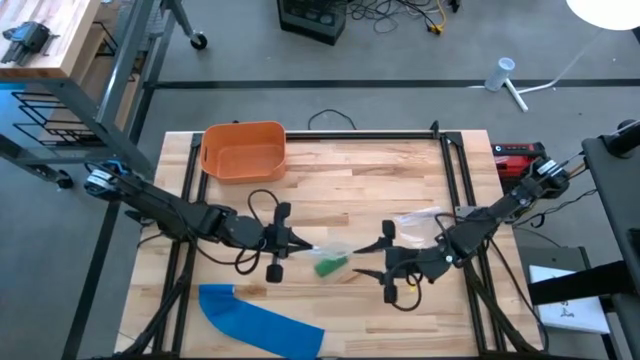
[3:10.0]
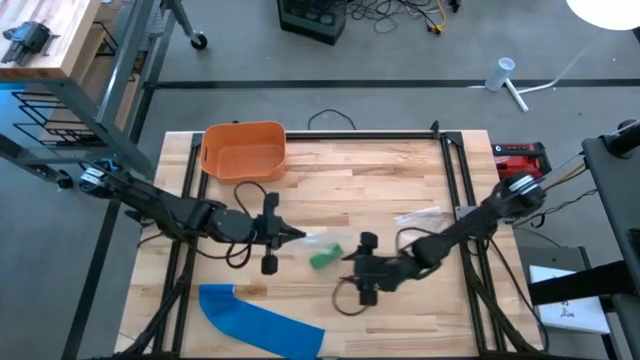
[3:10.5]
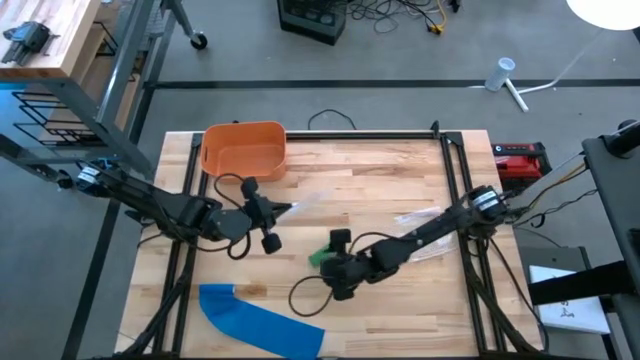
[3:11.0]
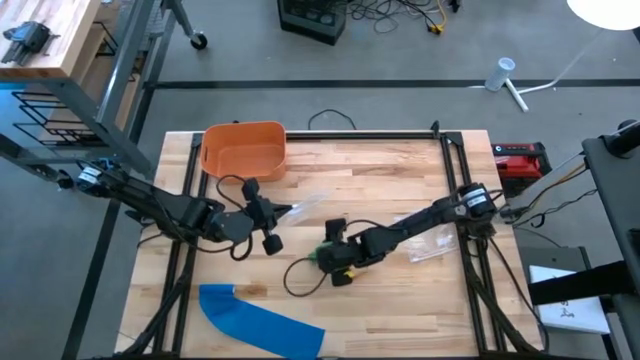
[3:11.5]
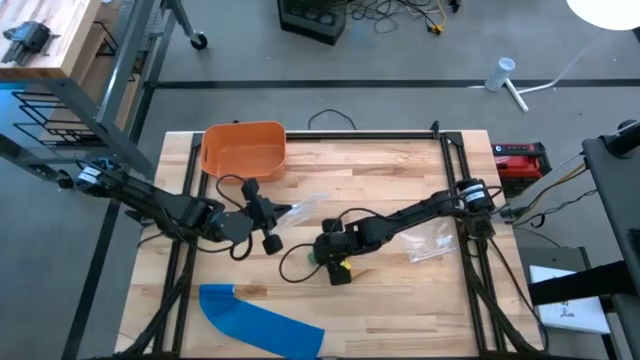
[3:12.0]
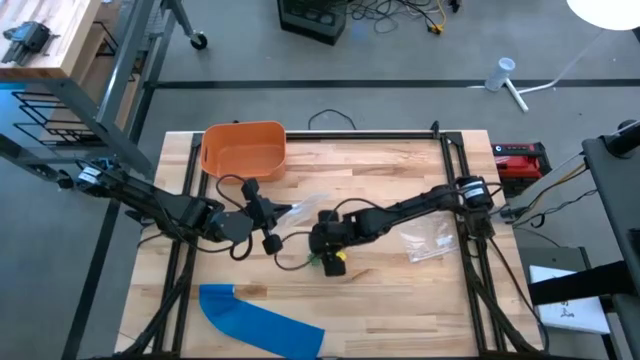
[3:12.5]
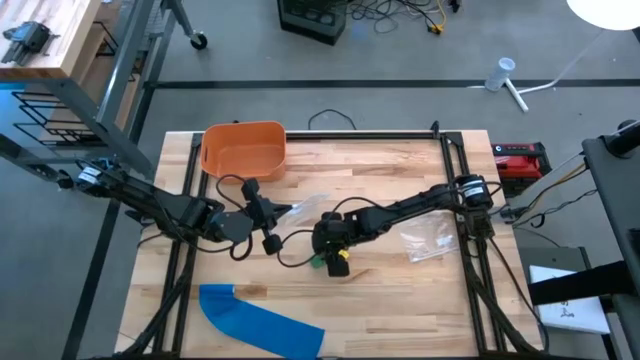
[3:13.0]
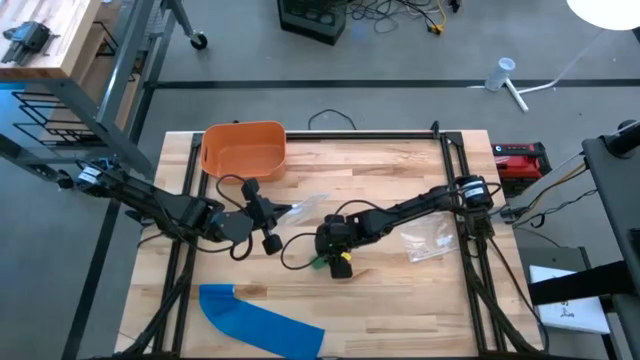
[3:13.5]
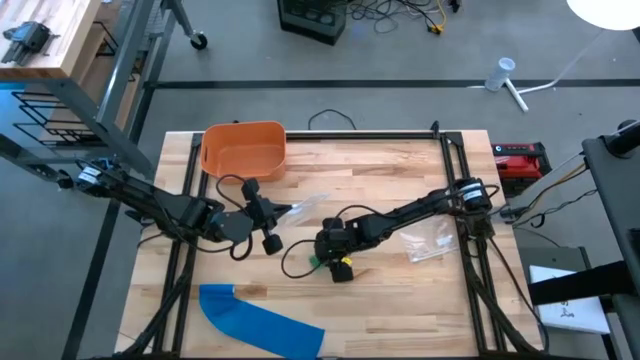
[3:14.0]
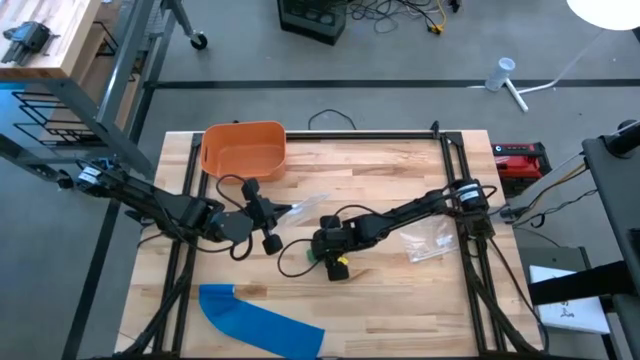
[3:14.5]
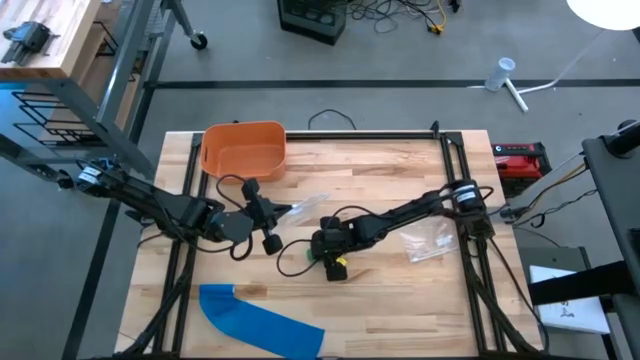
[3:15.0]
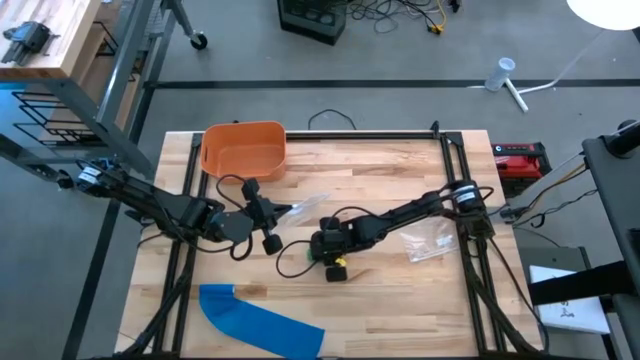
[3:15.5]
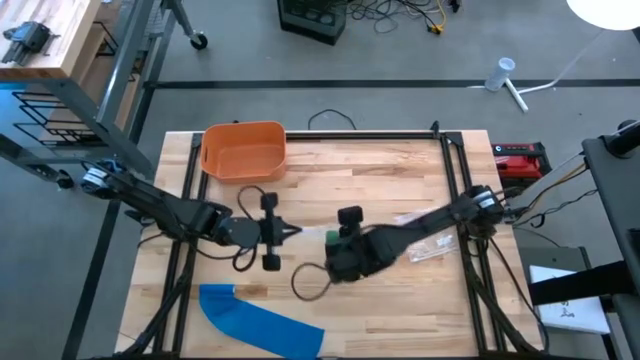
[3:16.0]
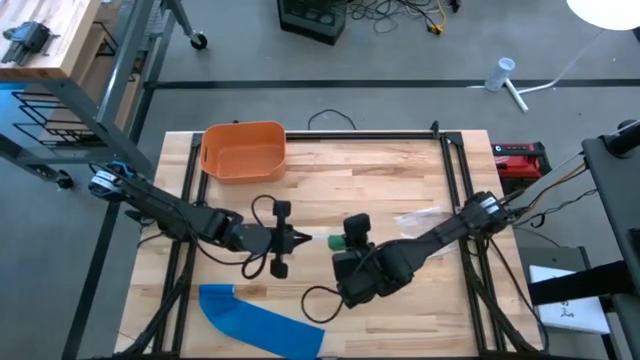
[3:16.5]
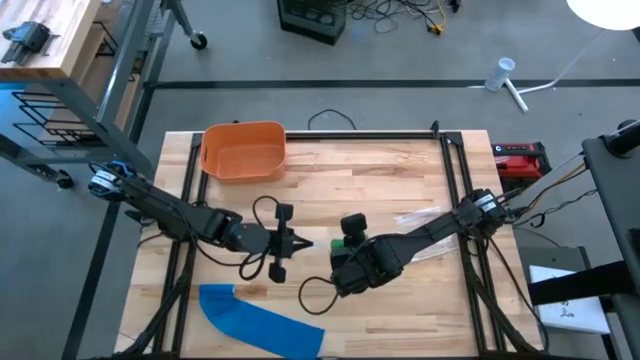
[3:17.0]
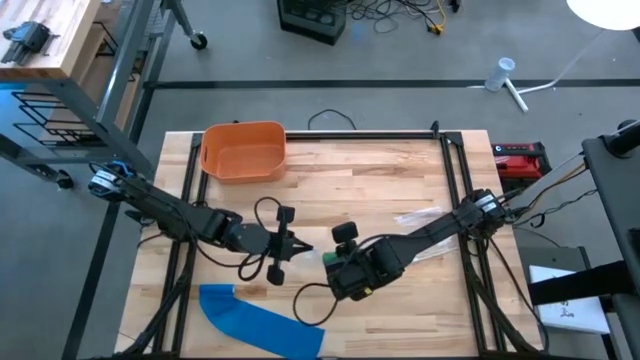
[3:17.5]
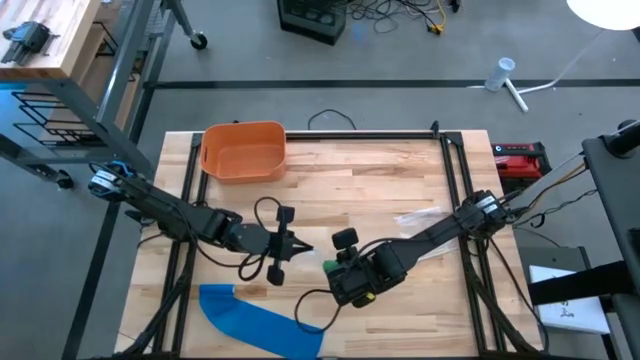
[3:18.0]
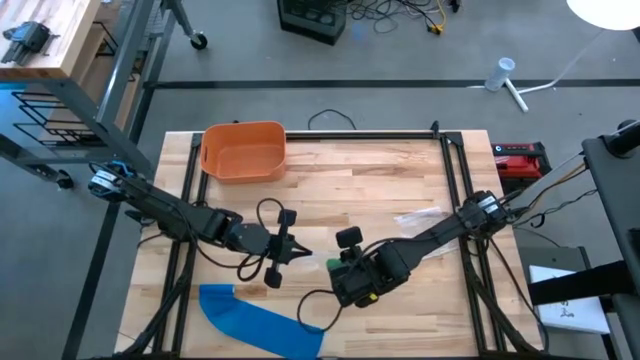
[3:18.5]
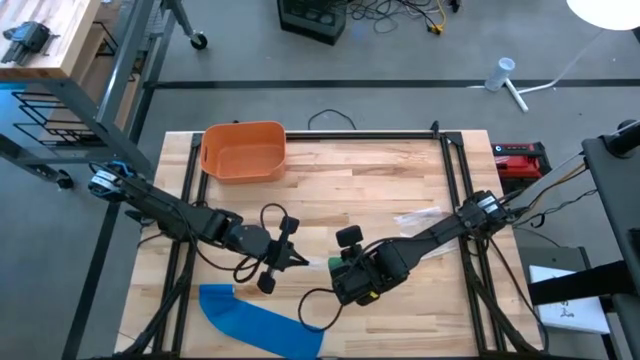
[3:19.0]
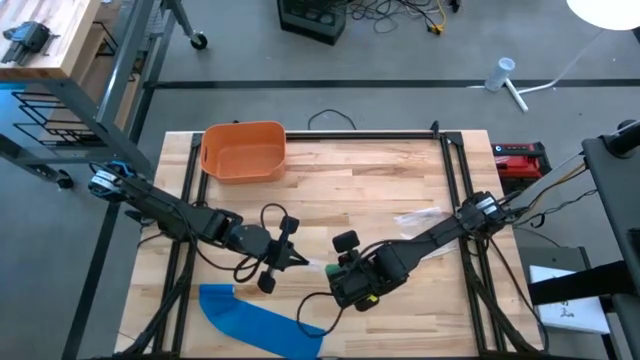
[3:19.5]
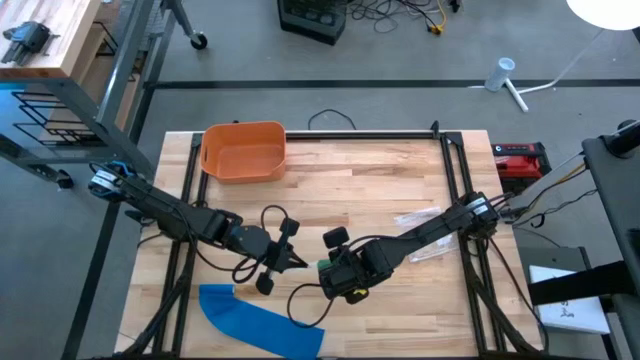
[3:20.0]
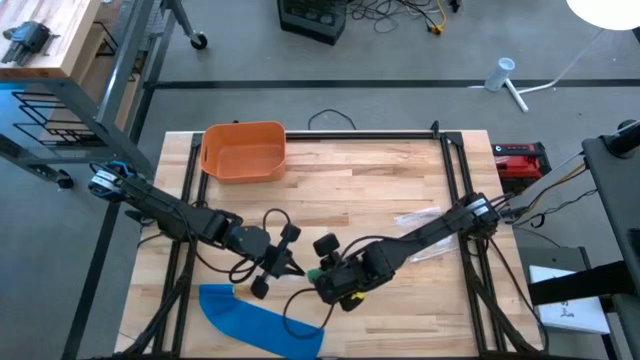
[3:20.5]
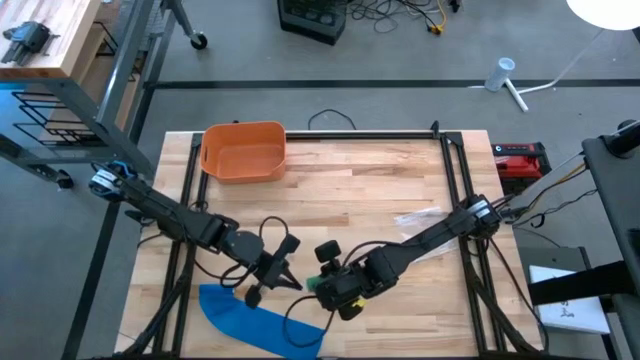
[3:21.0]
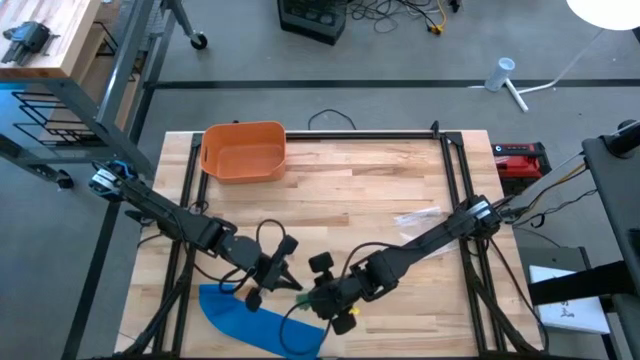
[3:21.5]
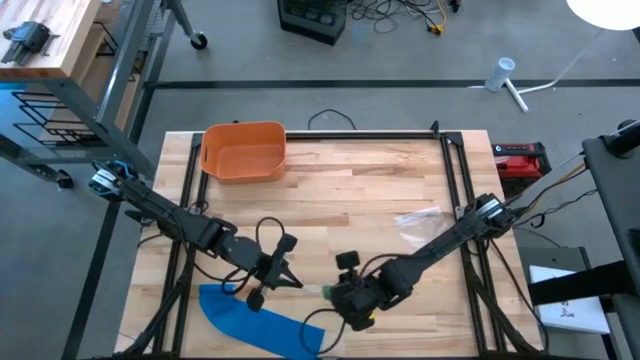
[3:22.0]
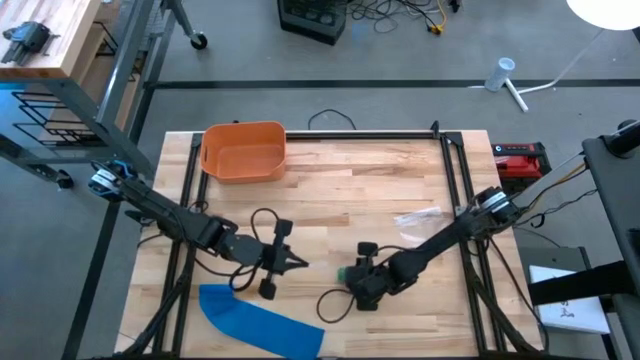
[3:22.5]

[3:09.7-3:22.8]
Task: Roll bandage
Put the rolled green bandage into the transparent zip bag

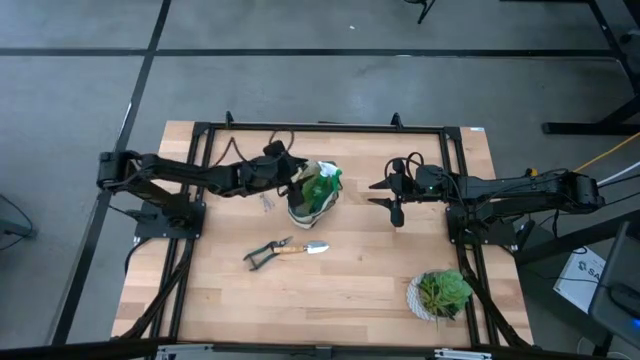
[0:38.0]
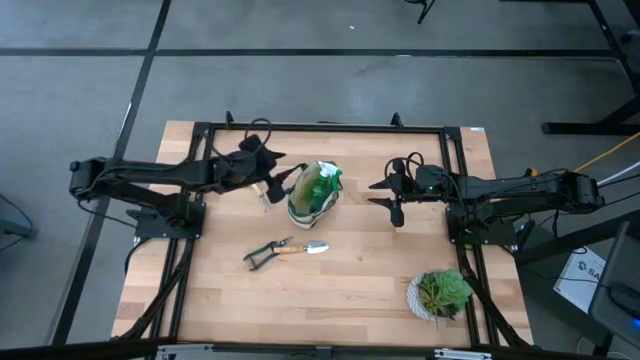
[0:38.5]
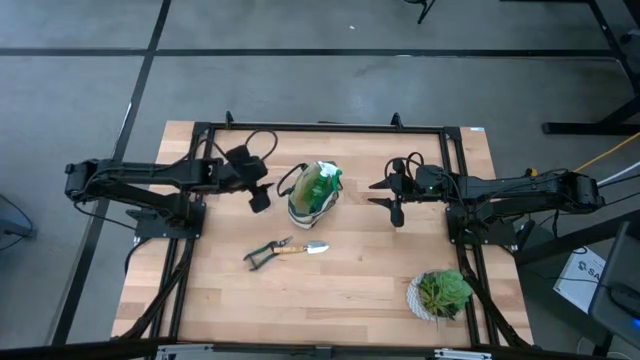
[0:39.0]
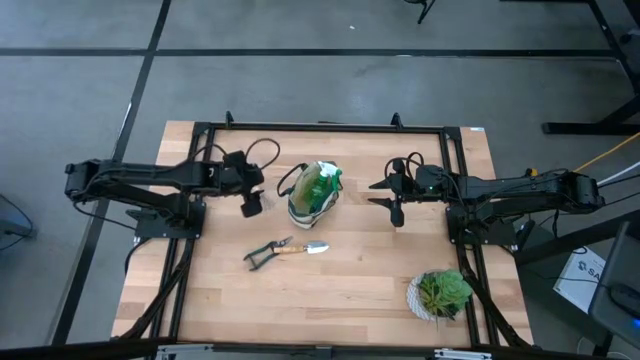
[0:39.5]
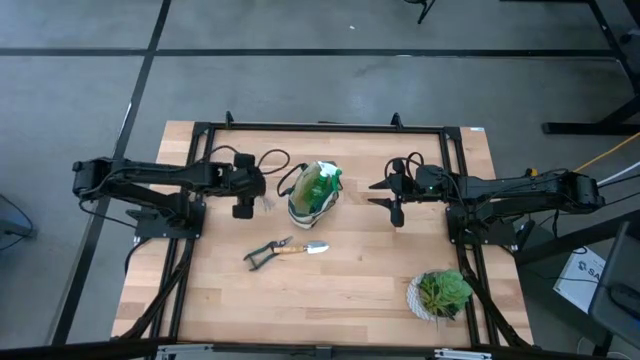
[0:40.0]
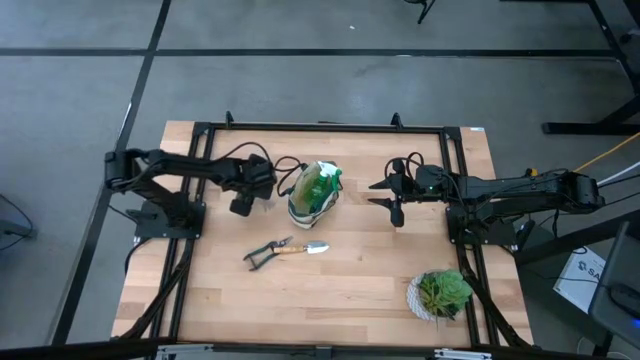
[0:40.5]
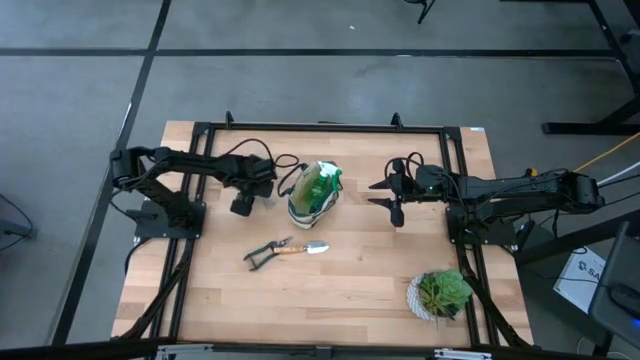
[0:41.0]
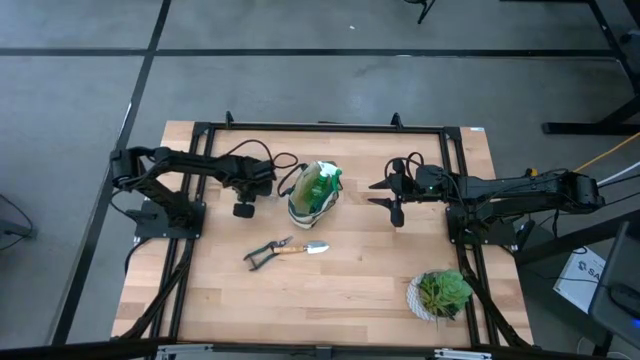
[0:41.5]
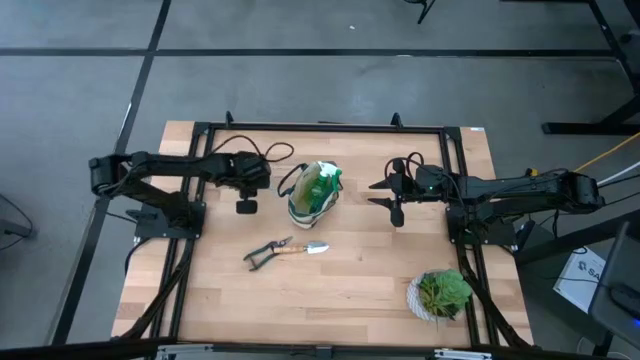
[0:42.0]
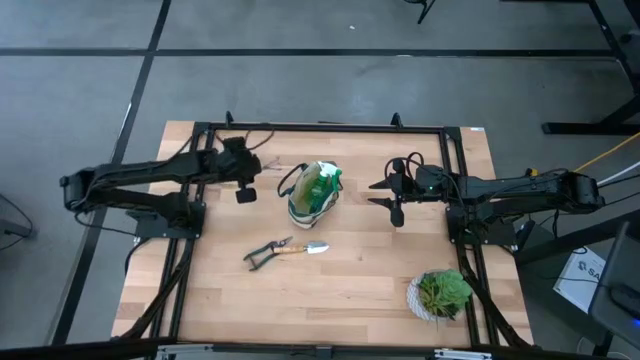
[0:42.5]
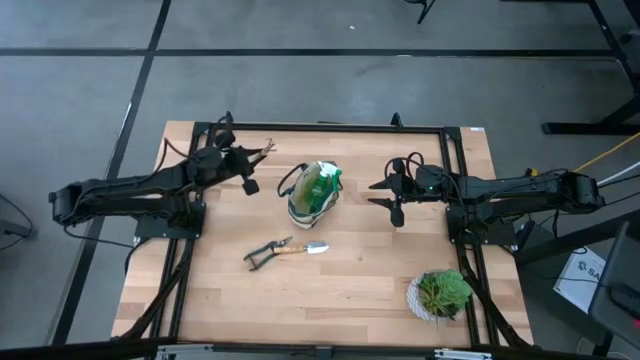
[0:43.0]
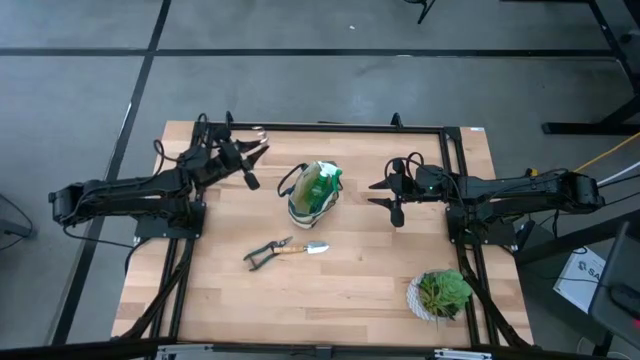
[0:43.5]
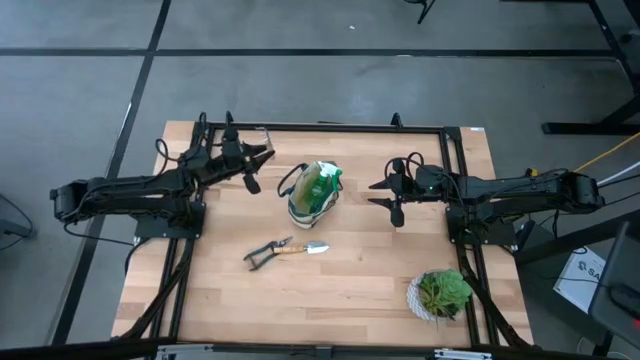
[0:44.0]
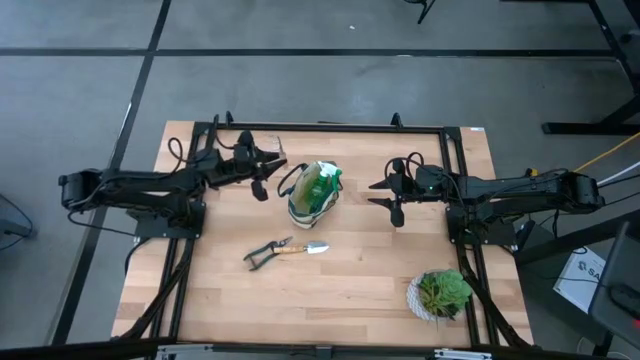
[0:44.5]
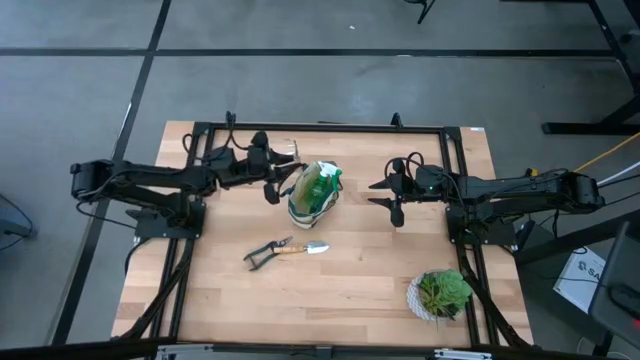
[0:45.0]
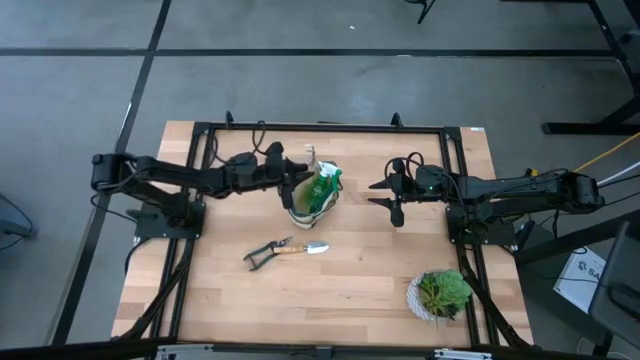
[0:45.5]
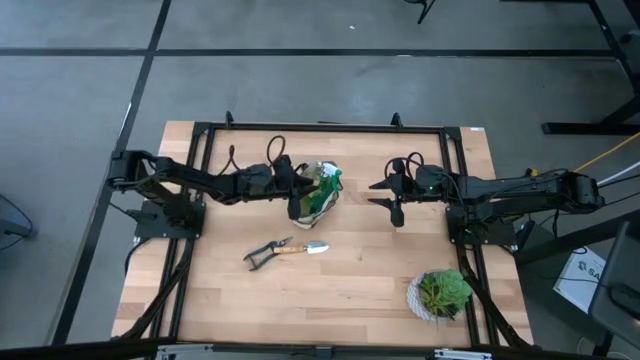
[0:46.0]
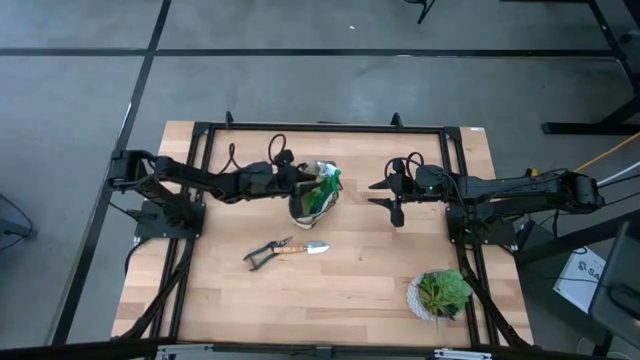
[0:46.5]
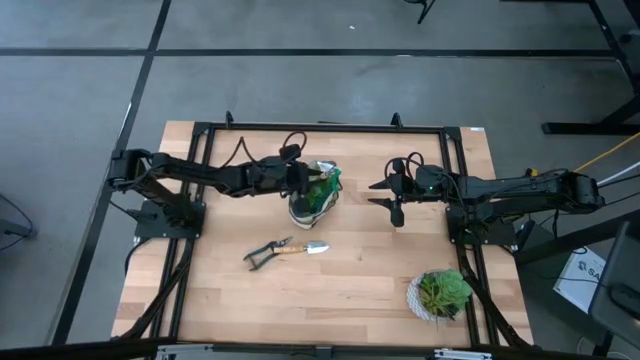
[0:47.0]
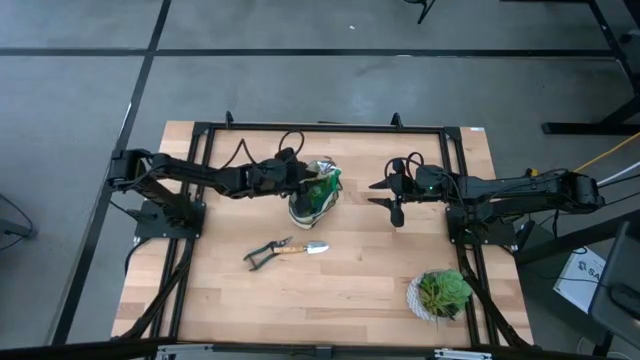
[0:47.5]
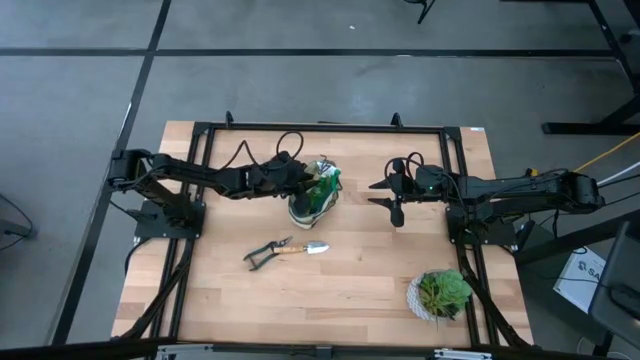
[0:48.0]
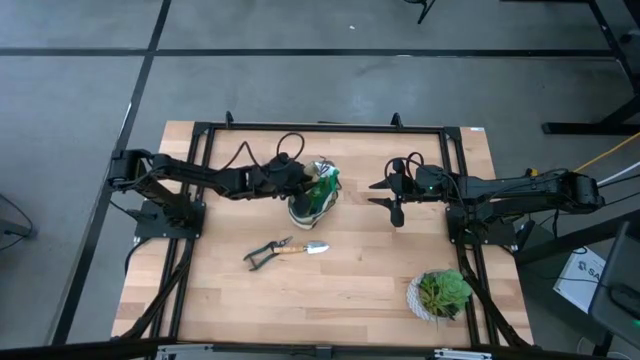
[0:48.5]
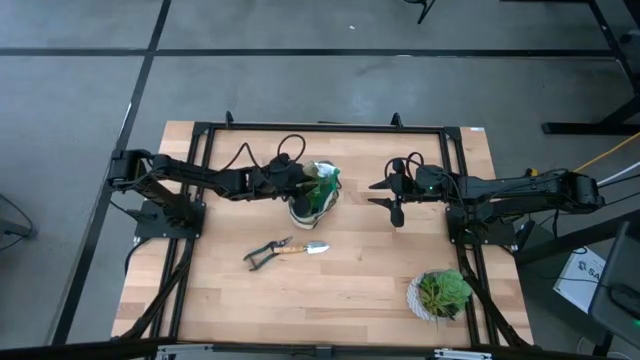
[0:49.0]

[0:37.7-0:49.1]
Task: Pick & Place Garden tools in Gardening bag
Put the brown hand rake into the gardening bag
